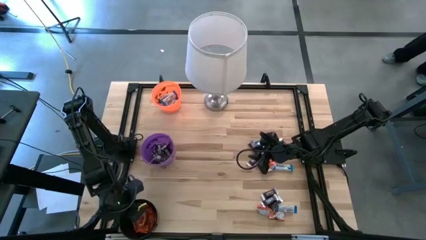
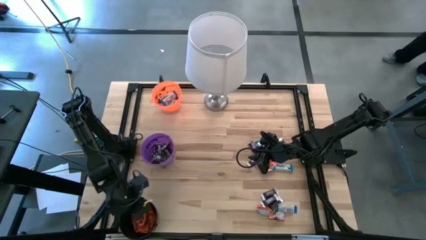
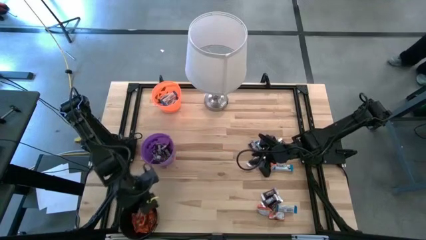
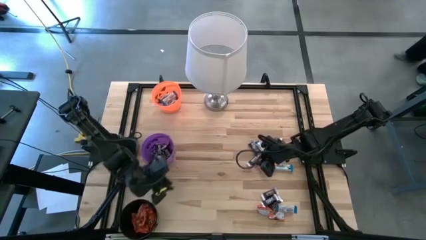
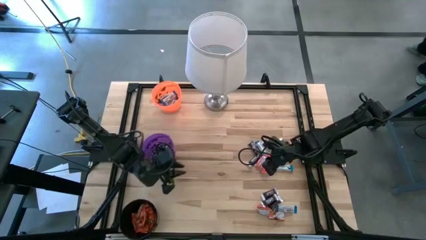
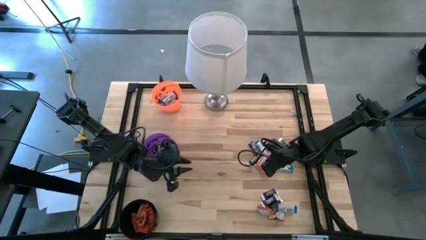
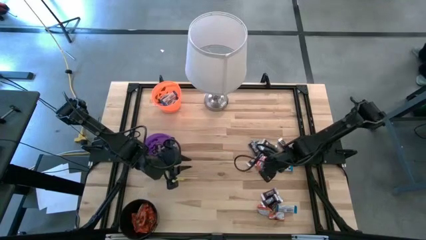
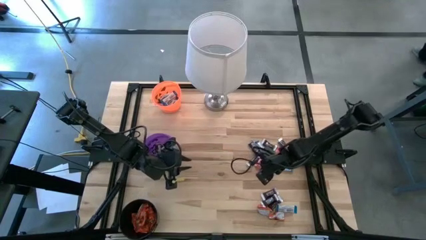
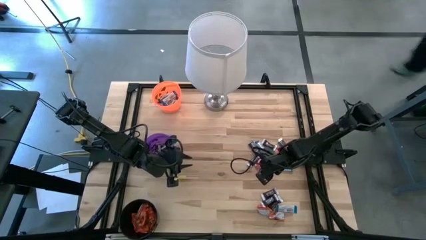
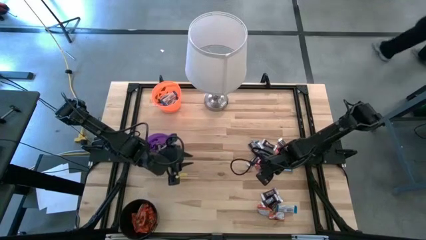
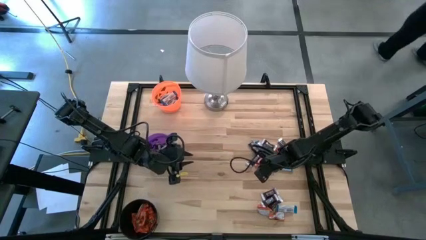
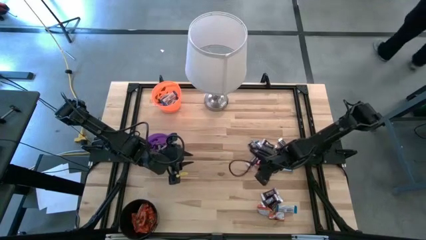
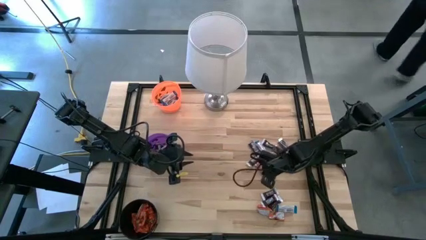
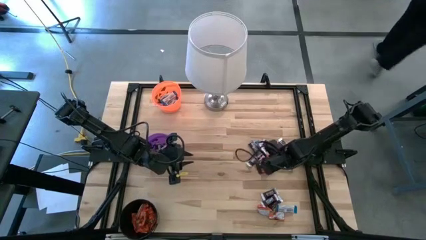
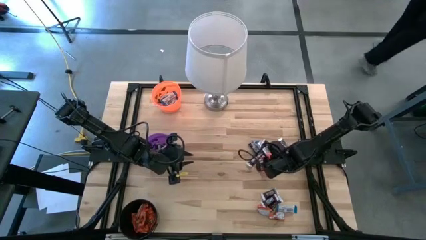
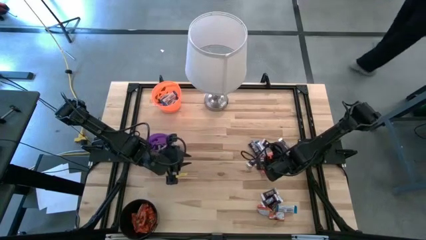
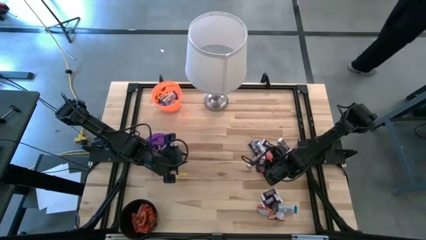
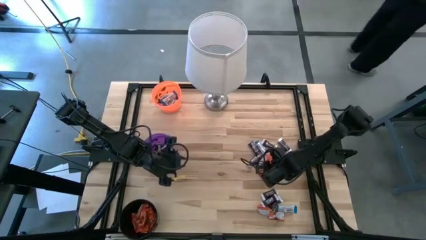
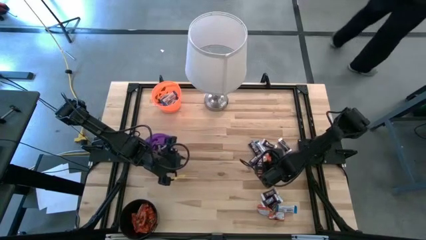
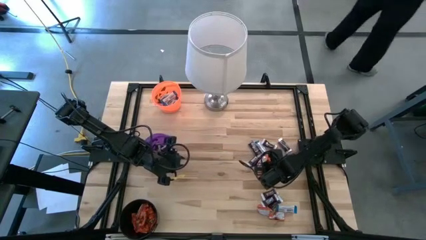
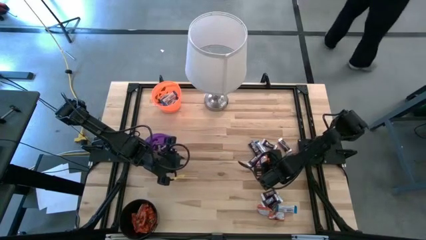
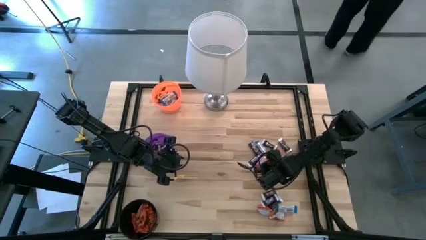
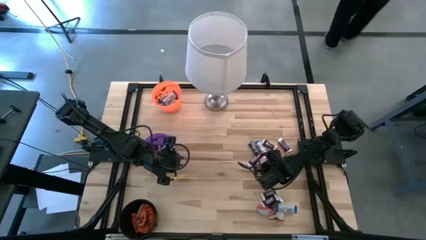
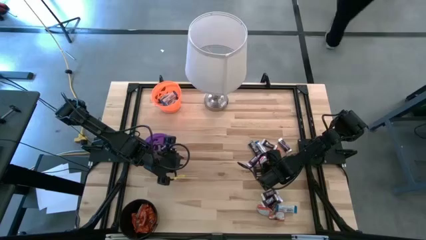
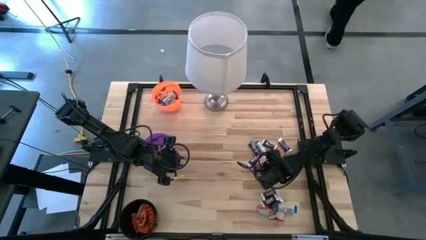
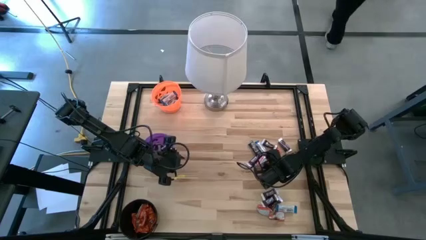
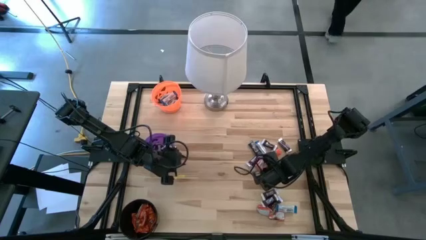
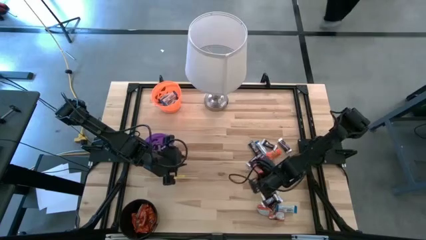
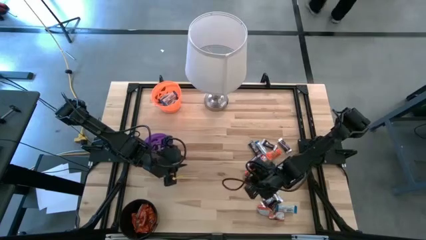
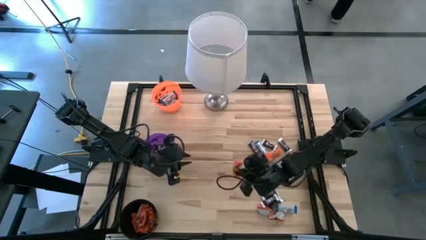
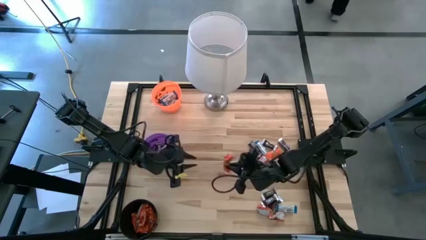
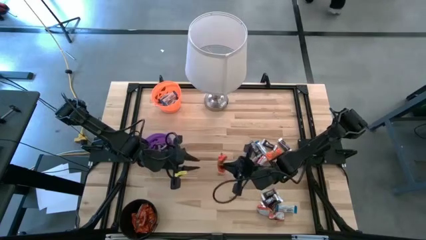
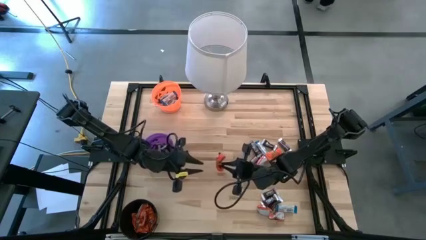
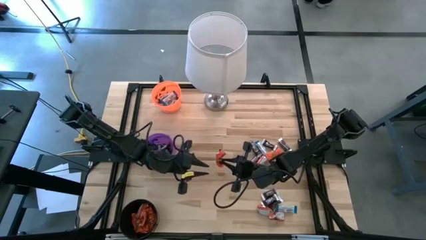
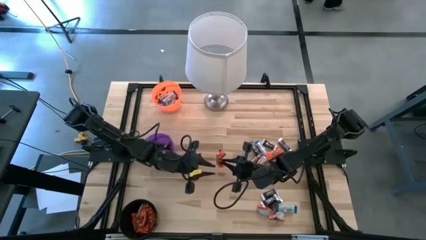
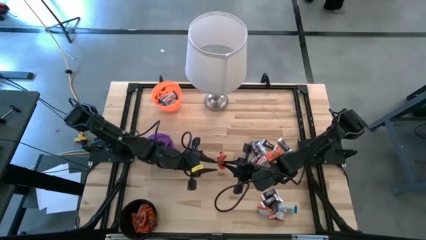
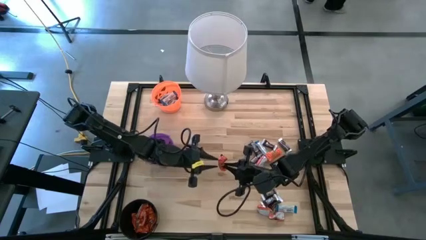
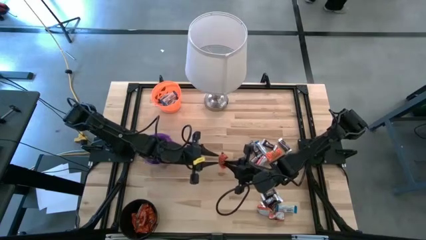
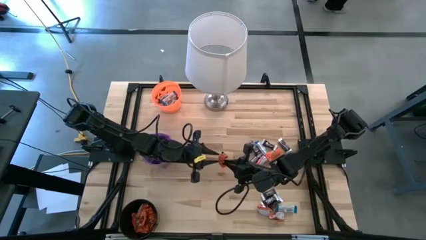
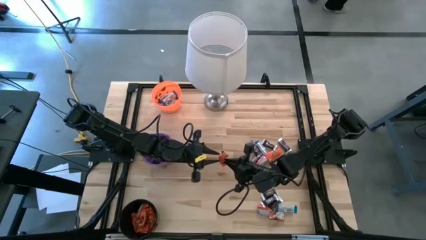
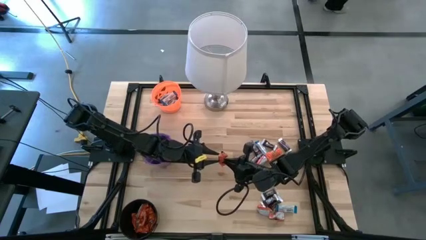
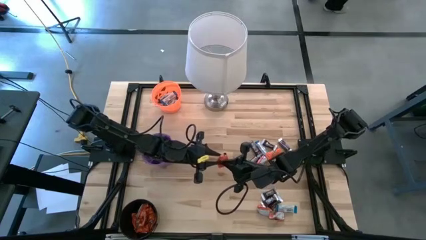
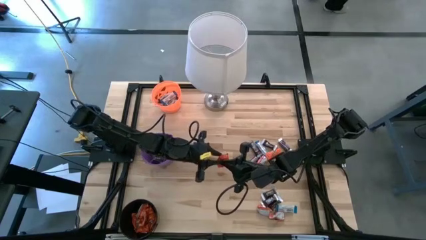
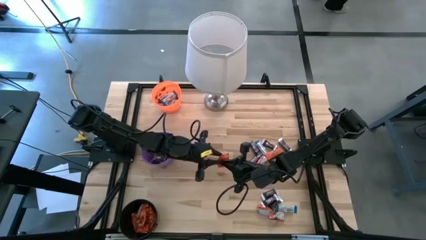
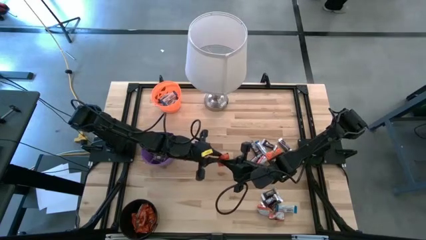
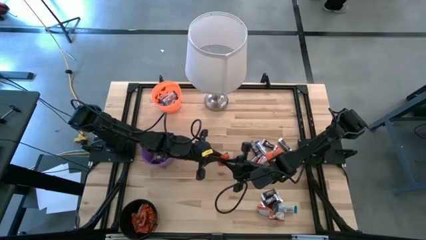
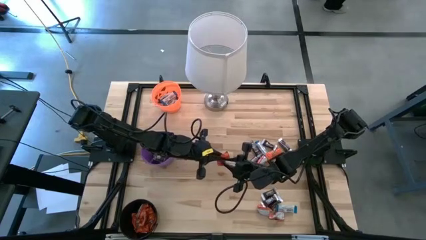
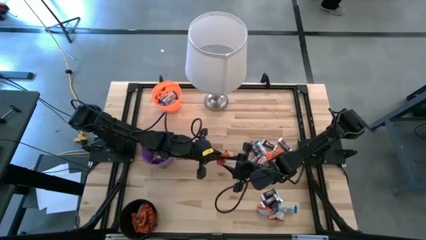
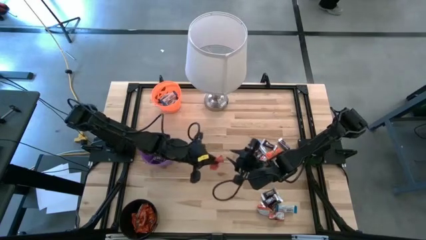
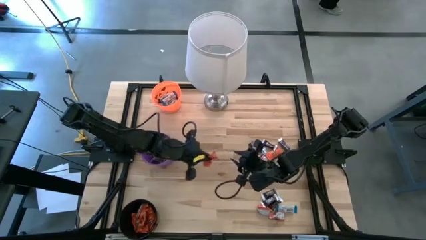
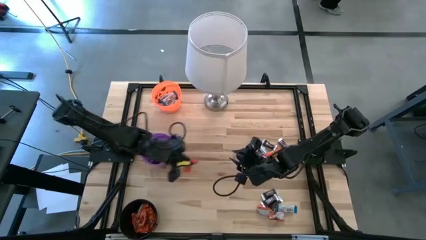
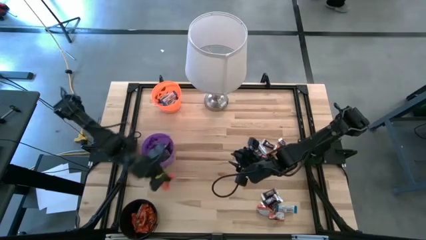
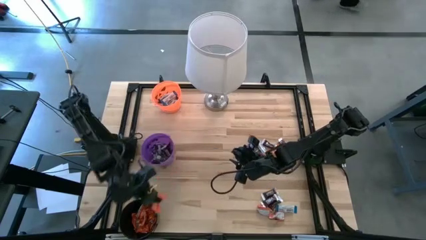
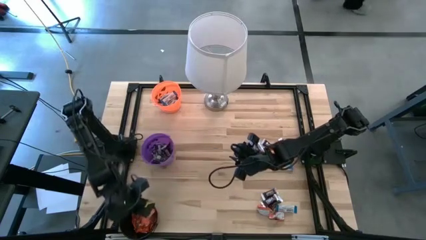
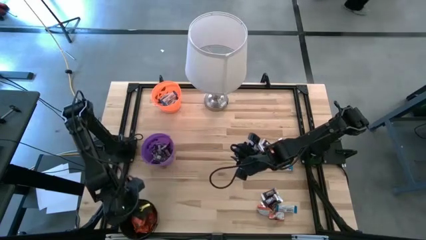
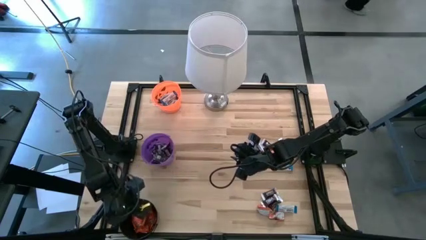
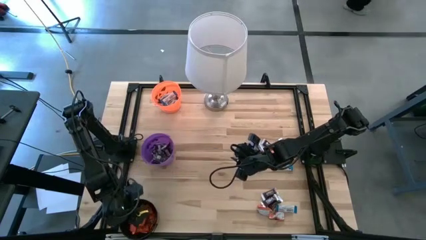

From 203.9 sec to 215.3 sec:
Task: Sort candy
Put the orange chocolate into the black bucket

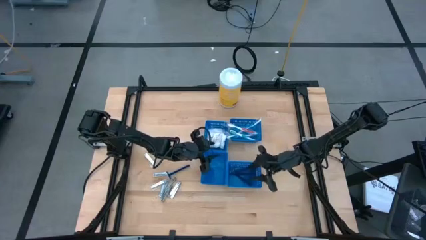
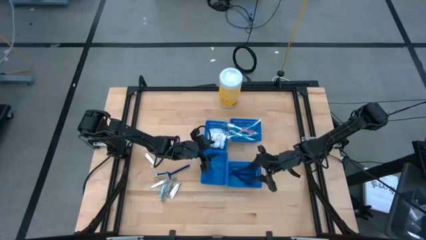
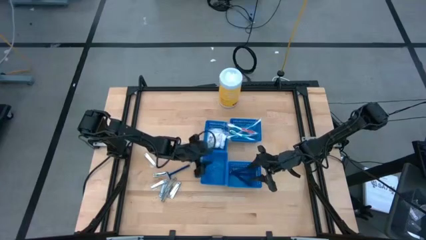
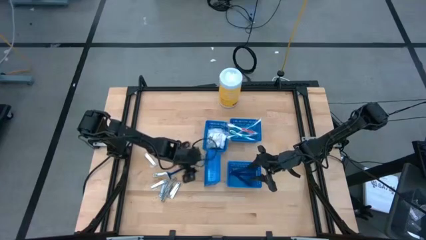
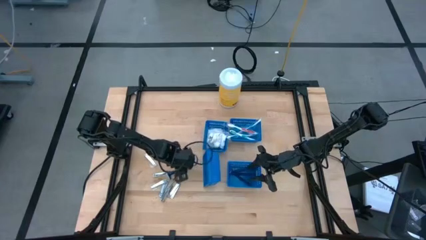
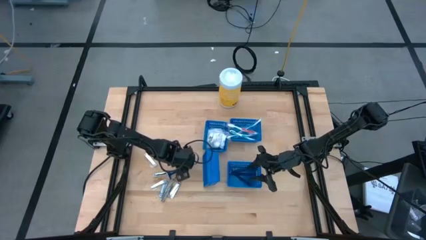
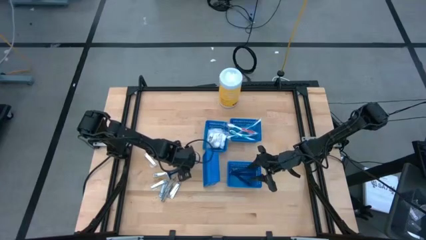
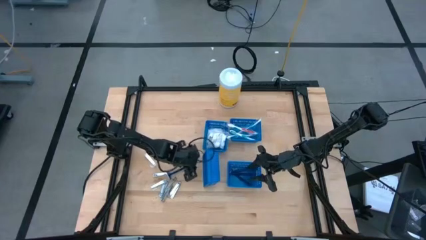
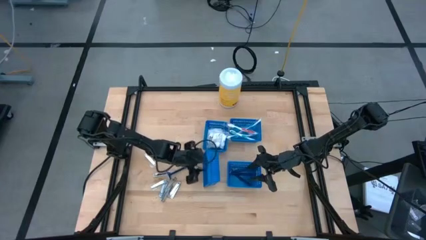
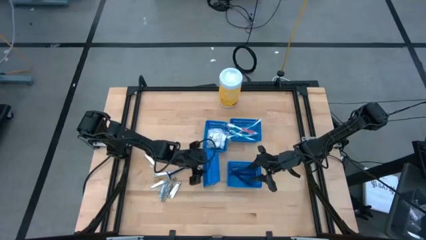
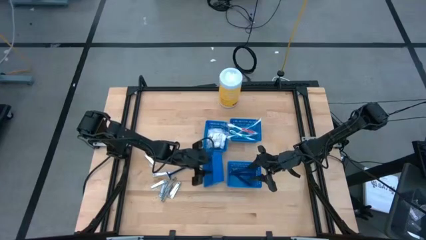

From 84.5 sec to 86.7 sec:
Task: Pick & Place Travel size toiletries
Adjust the bottom left bin on the table
